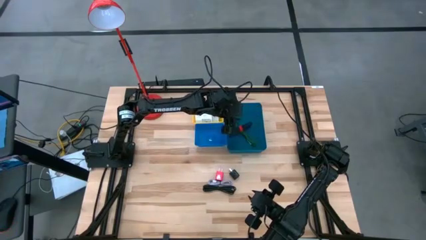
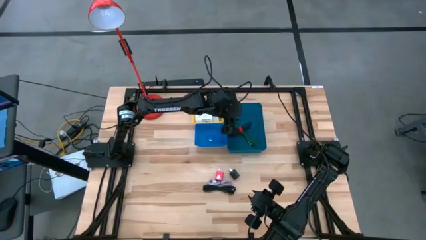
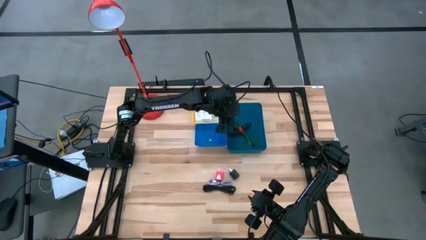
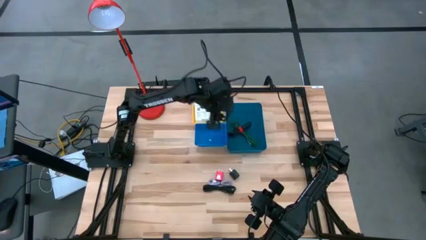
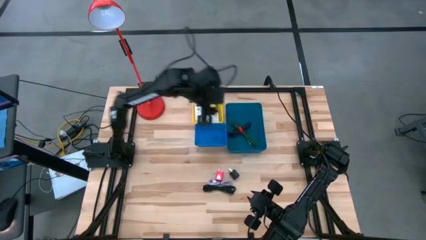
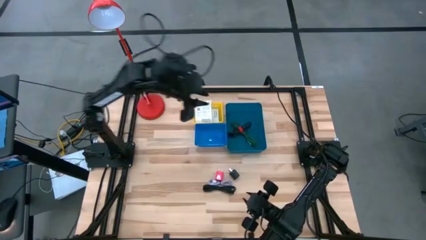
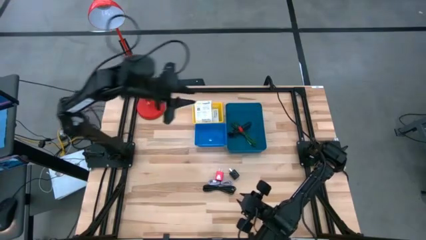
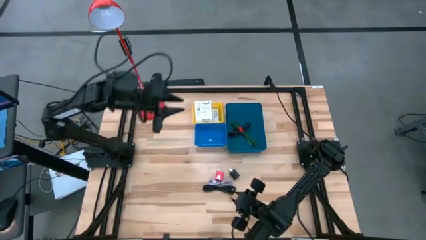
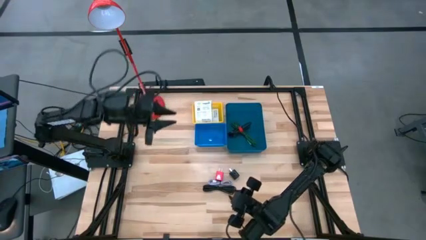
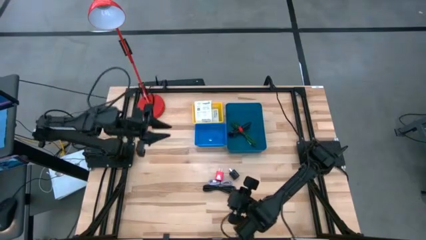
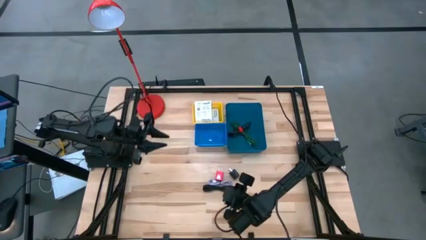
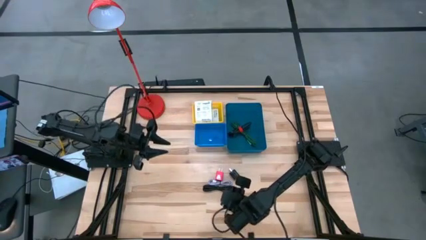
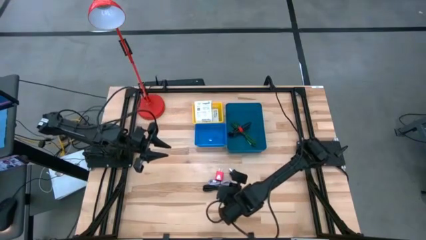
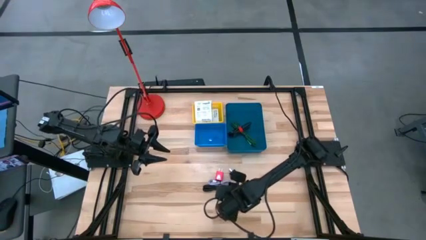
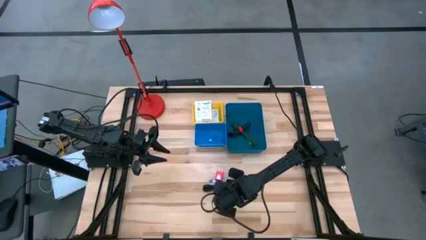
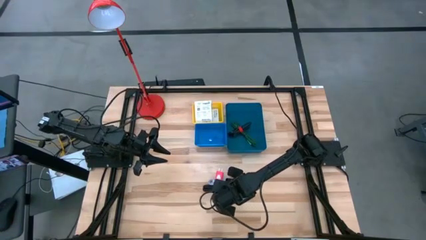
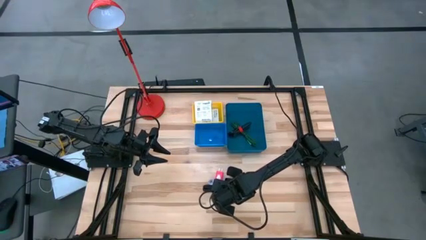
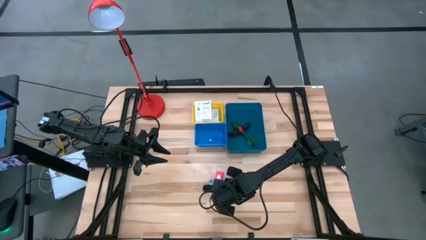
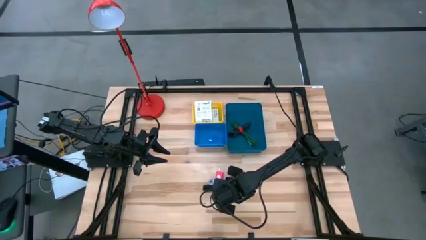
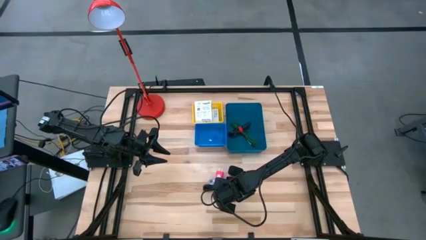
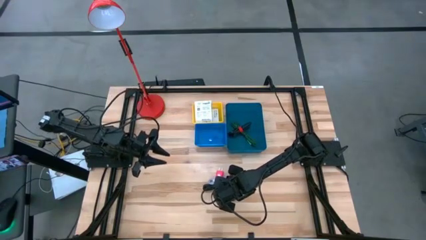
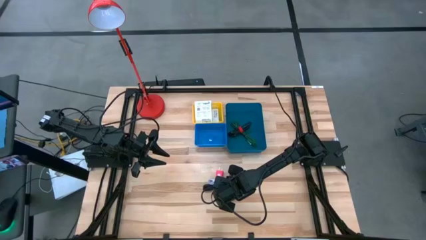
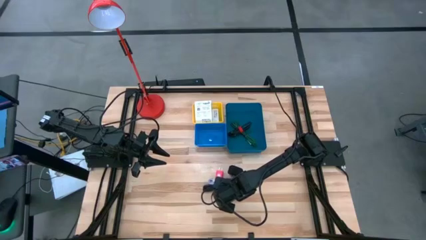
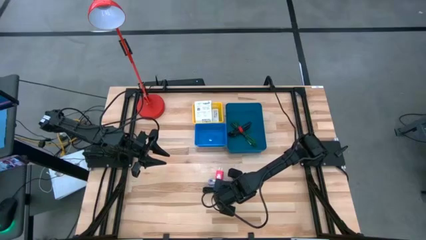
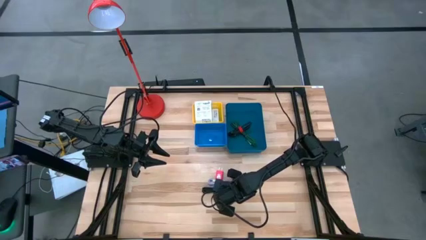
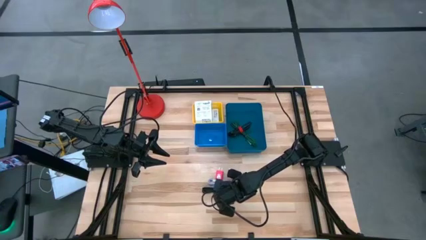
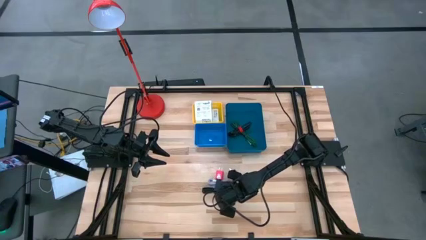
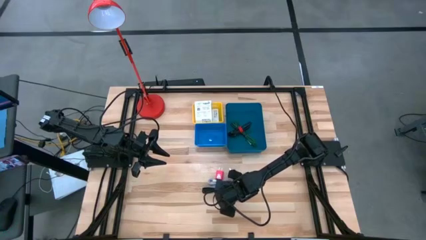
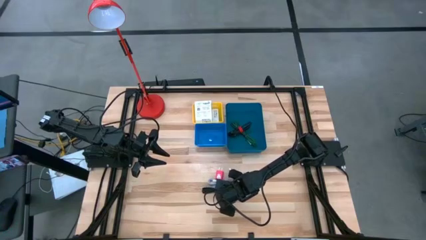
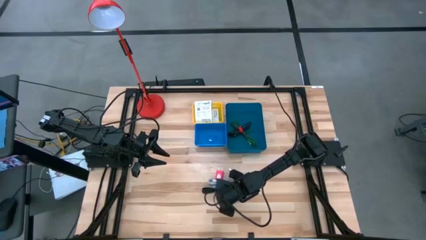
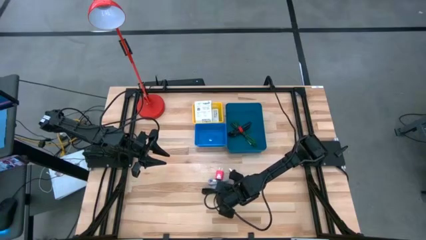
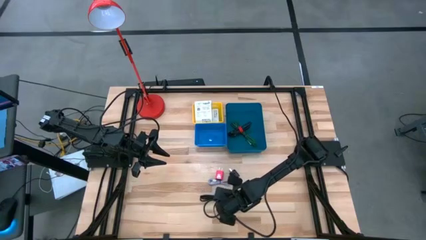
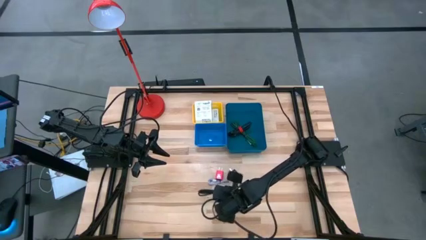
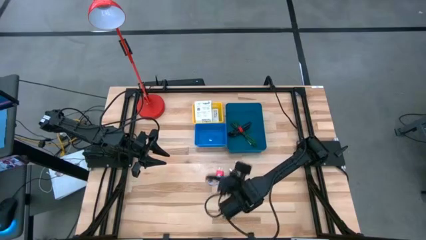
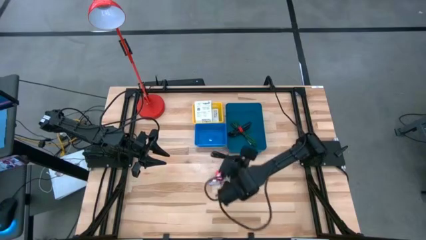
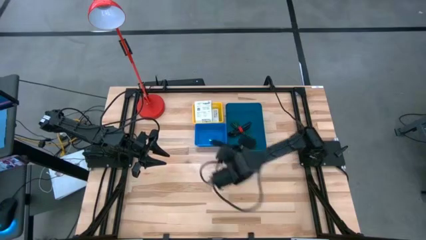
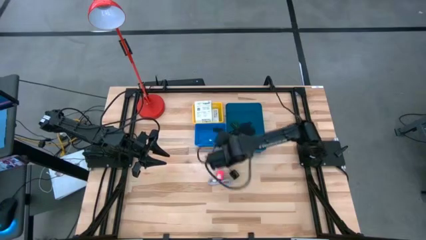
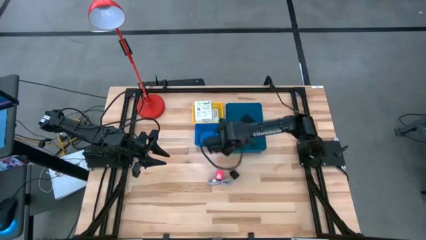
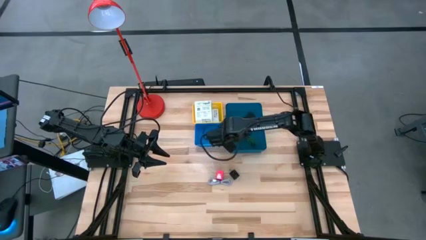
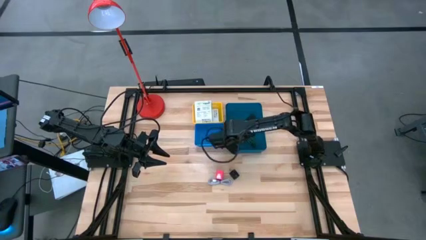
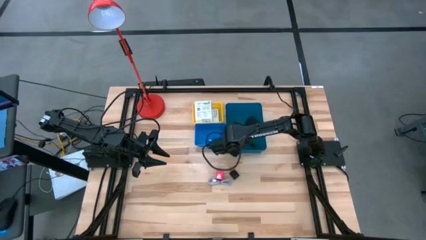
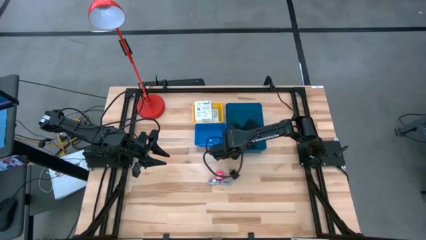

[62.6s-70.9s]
Task: Pick and place items into bin
Put the black charger cable into the light blue bin

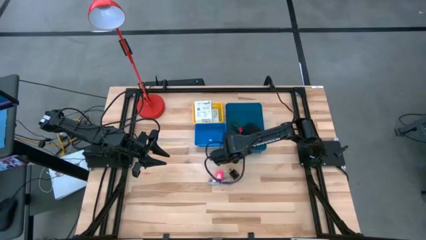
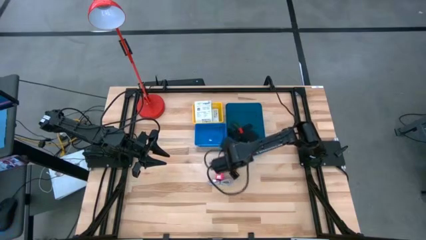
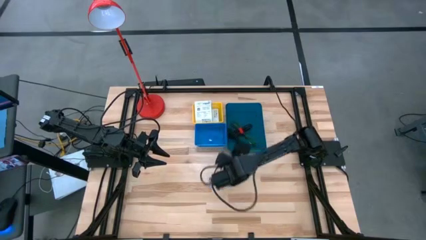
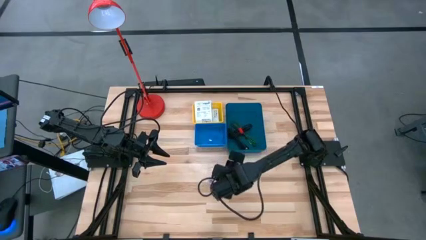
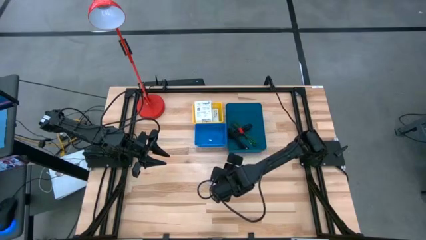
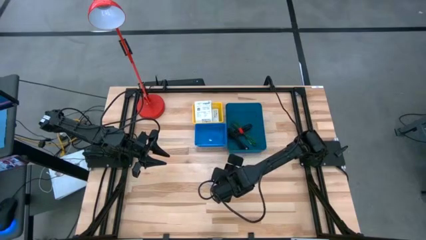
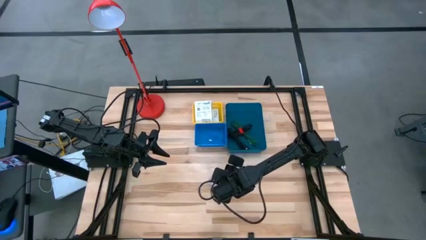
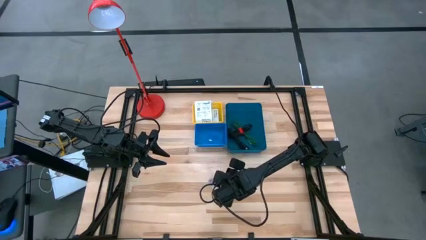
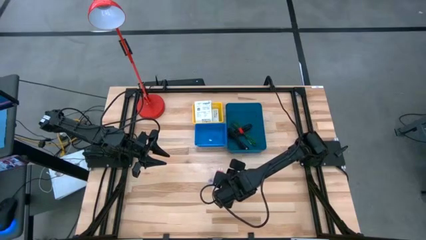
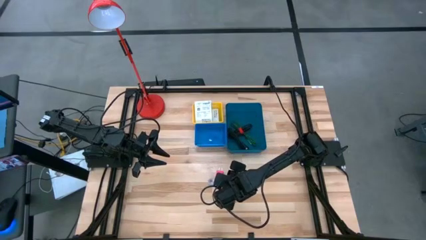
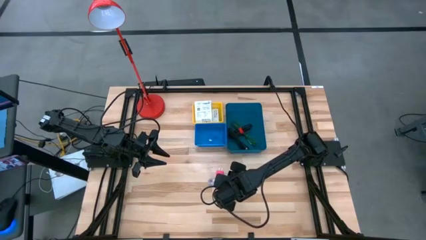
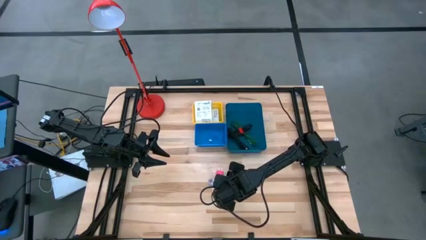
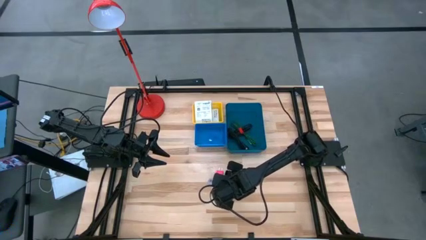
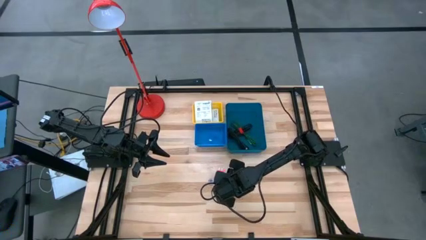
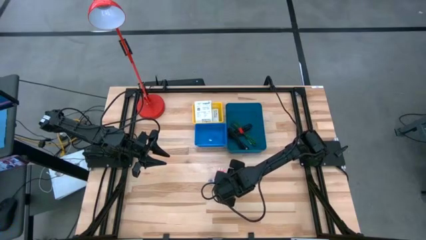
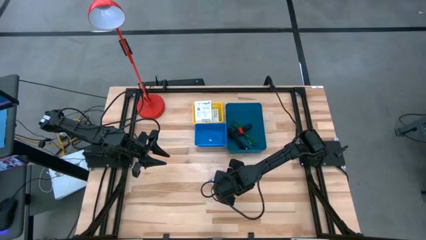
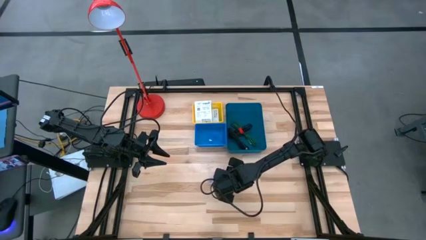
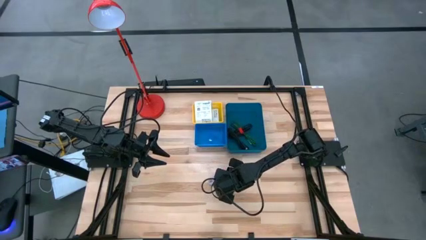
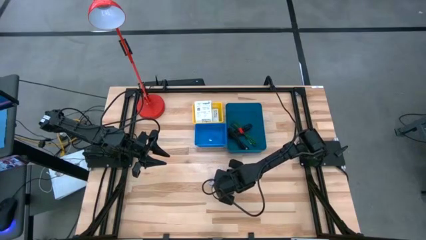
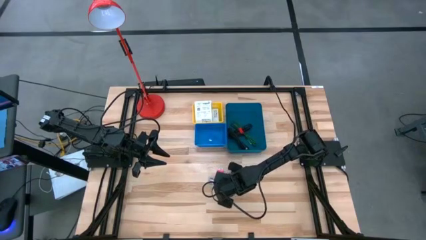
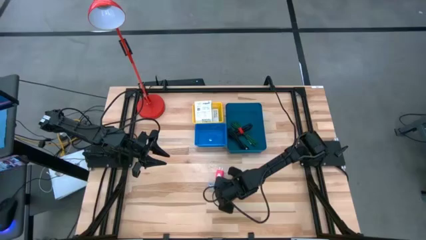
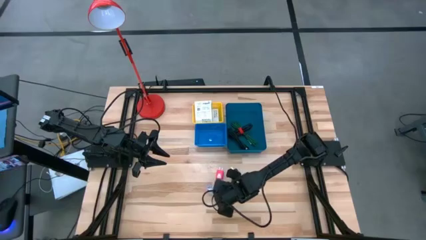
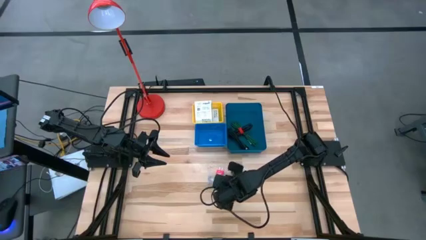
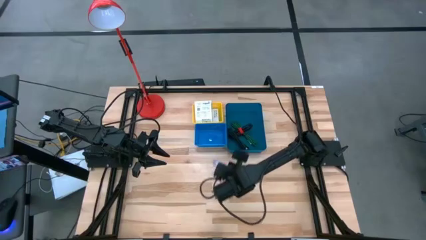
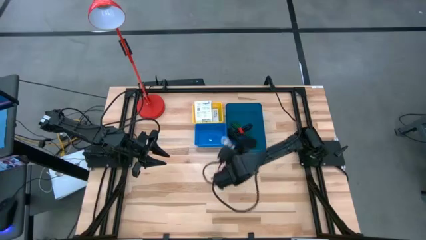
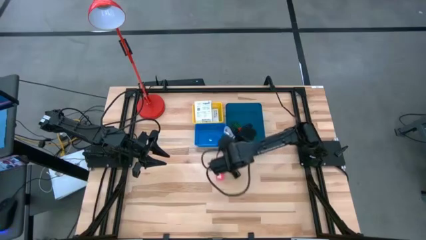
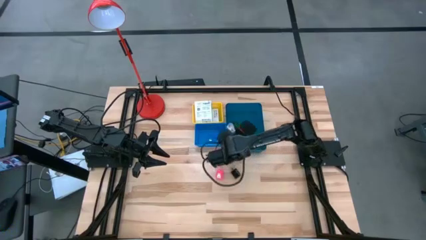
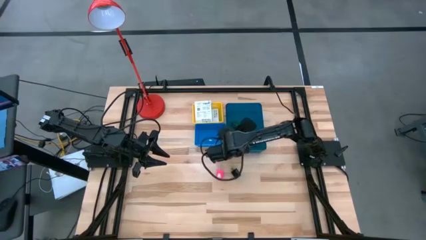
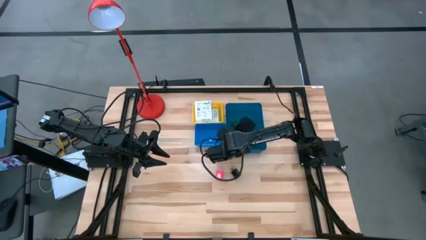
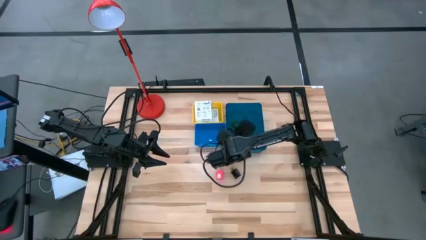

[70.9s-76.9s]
Put the gray charger cable into the light blue bin
